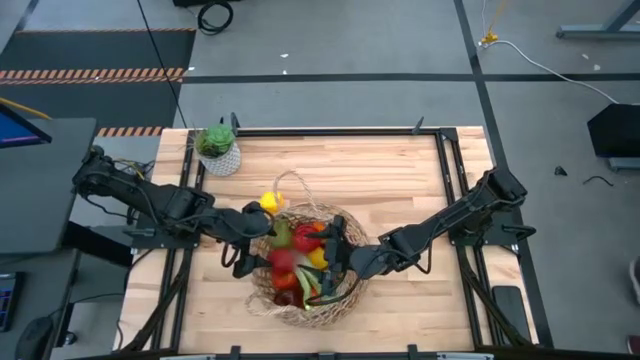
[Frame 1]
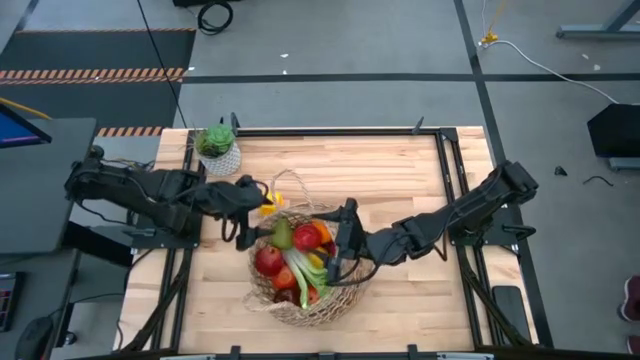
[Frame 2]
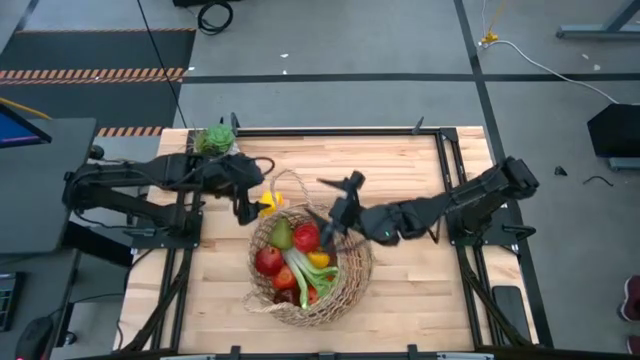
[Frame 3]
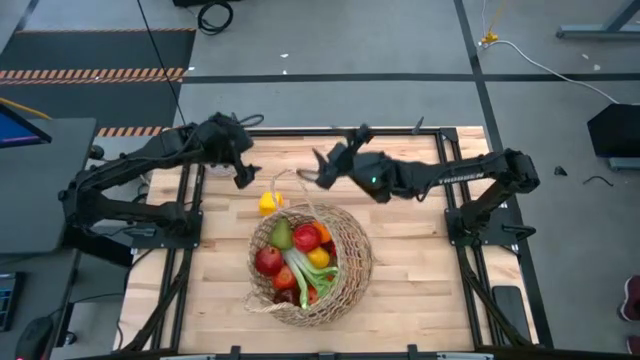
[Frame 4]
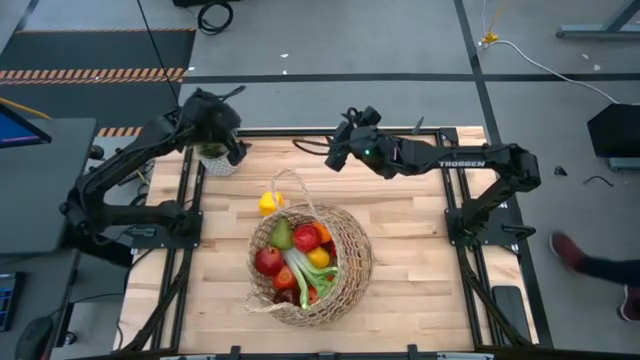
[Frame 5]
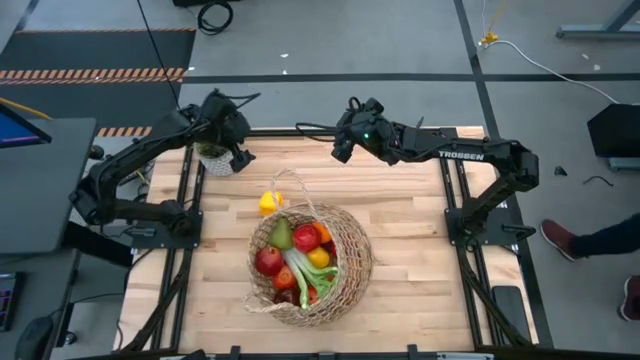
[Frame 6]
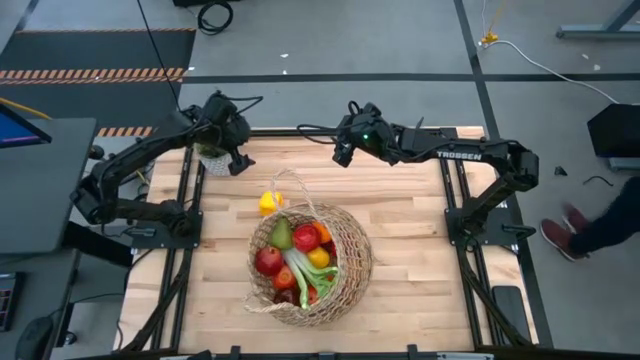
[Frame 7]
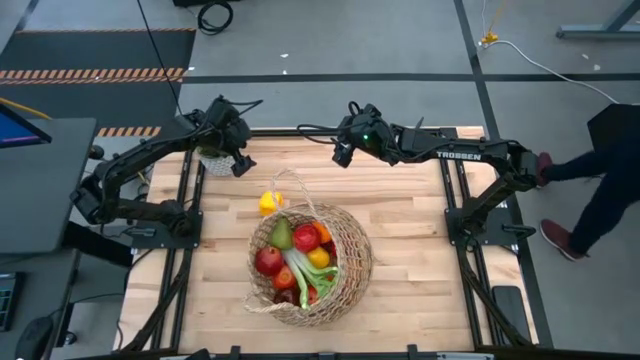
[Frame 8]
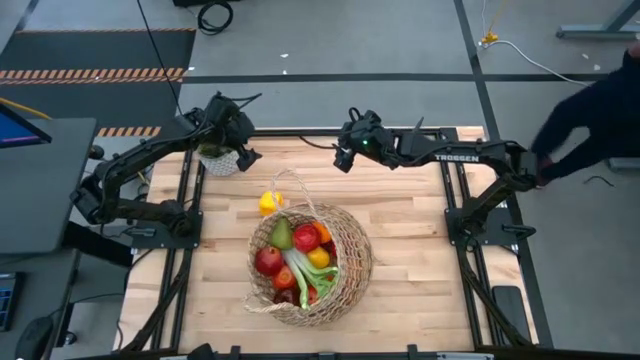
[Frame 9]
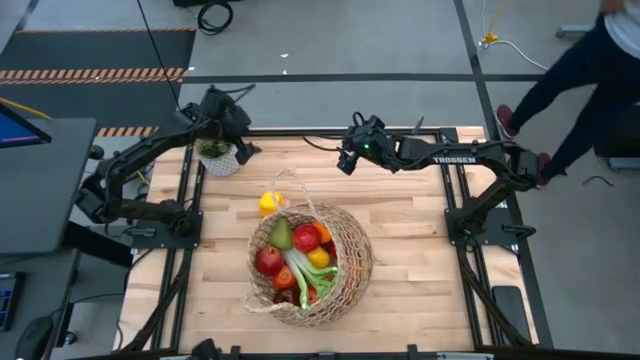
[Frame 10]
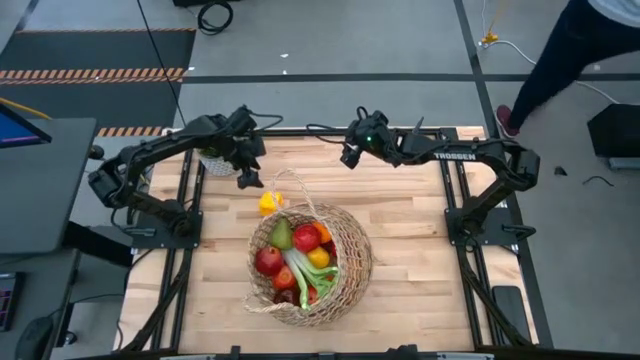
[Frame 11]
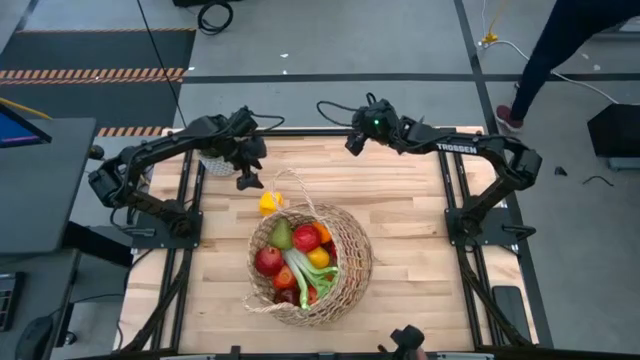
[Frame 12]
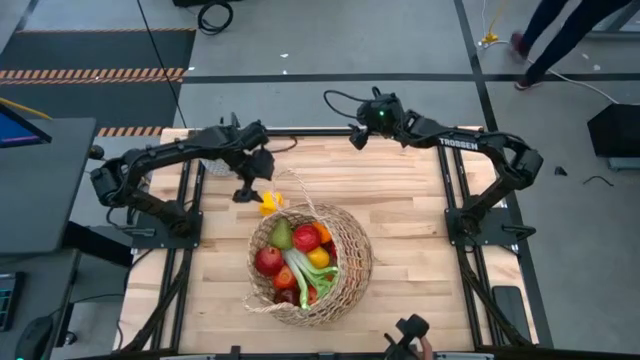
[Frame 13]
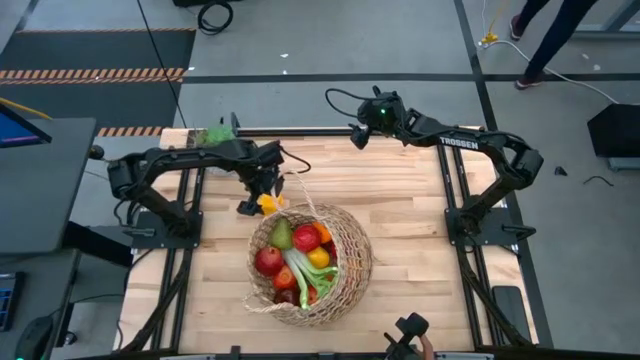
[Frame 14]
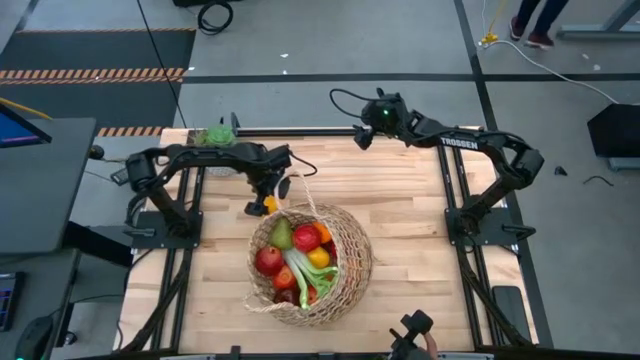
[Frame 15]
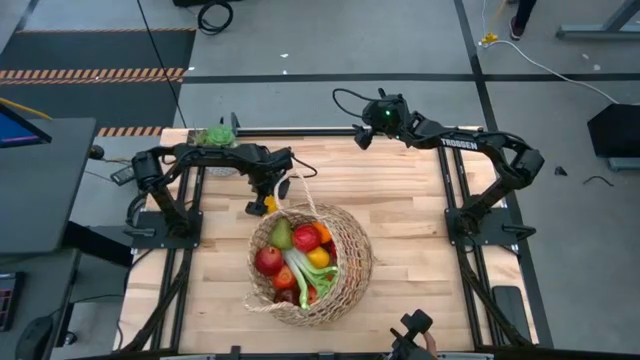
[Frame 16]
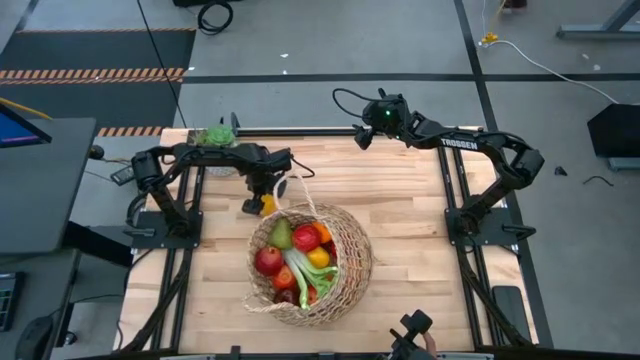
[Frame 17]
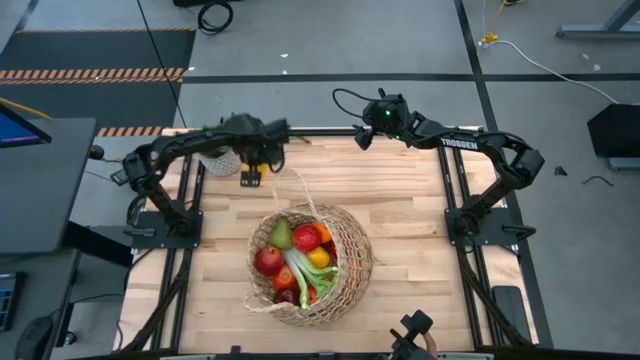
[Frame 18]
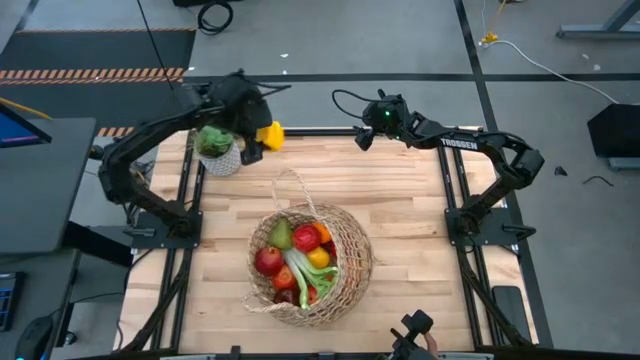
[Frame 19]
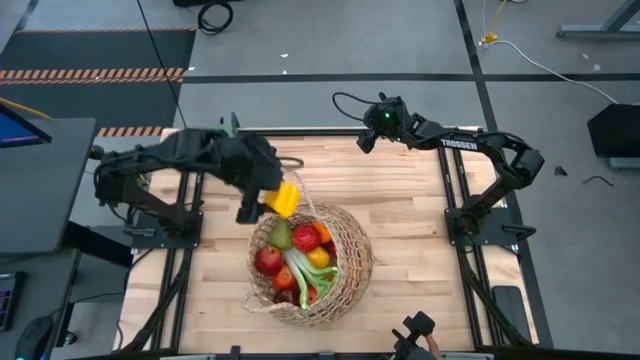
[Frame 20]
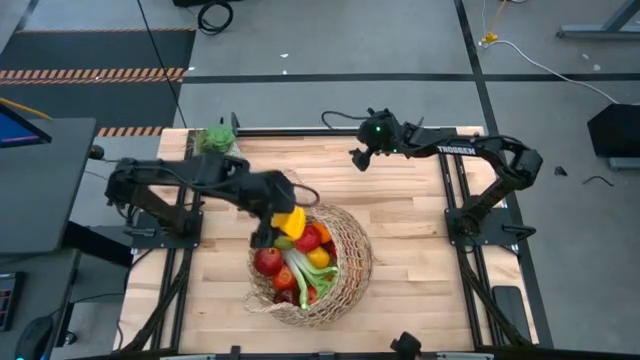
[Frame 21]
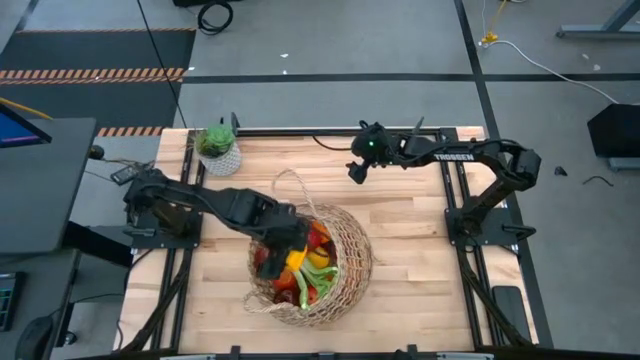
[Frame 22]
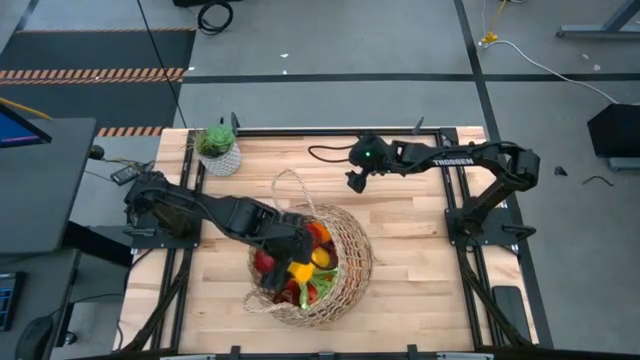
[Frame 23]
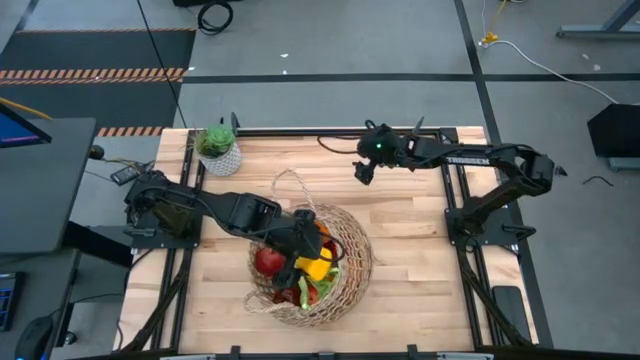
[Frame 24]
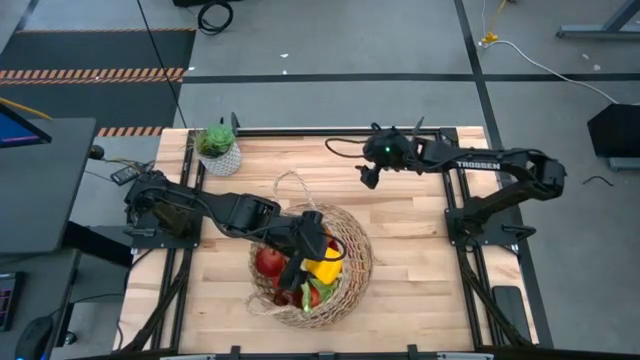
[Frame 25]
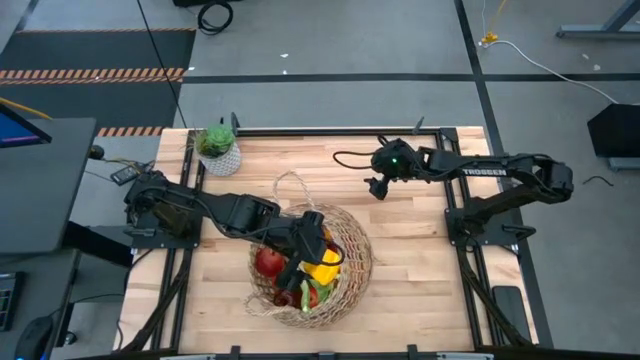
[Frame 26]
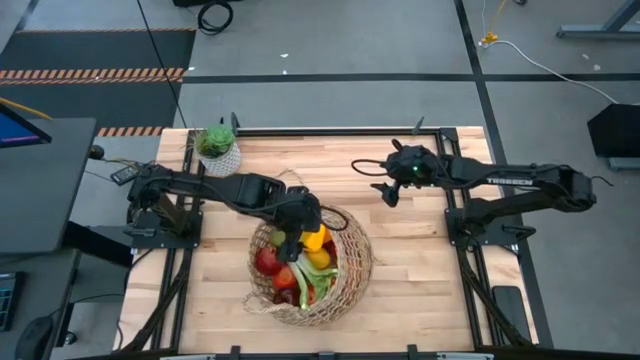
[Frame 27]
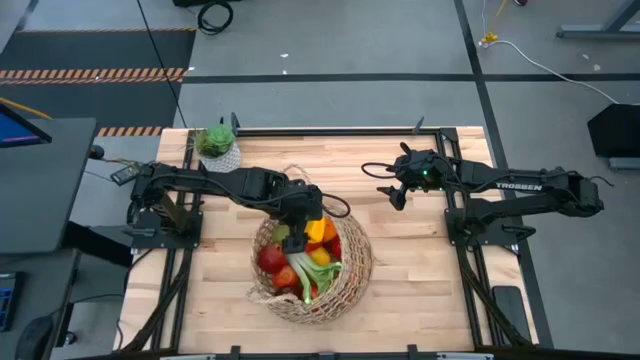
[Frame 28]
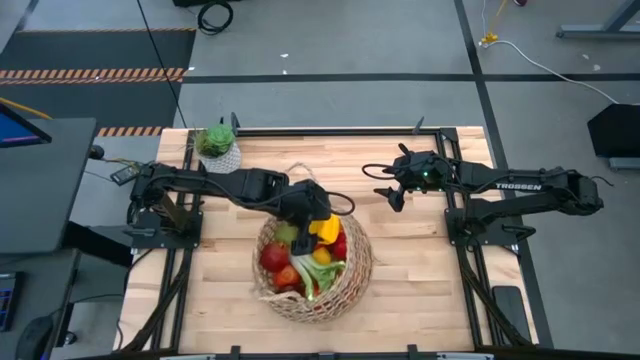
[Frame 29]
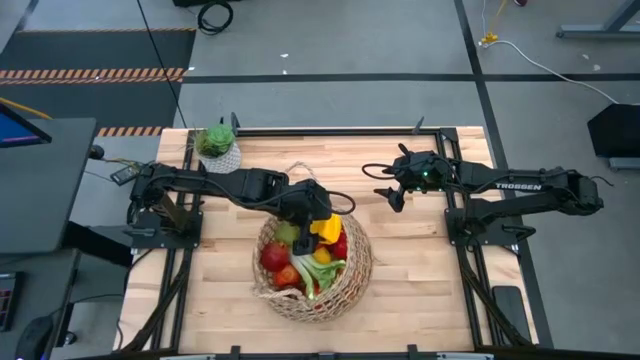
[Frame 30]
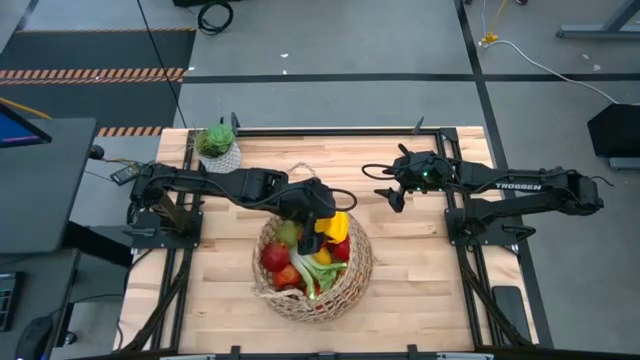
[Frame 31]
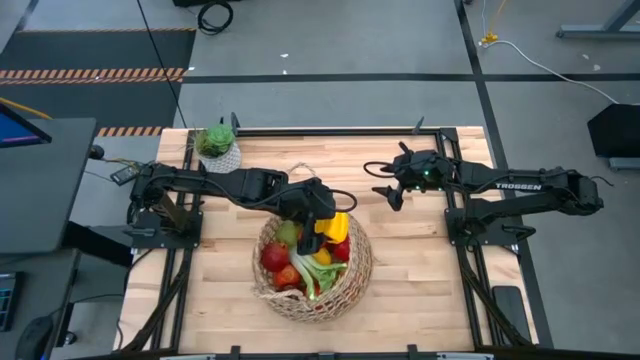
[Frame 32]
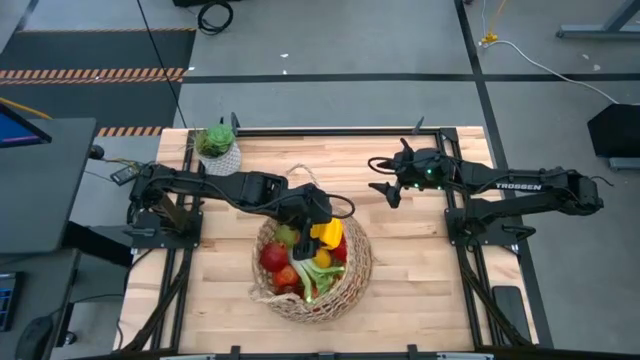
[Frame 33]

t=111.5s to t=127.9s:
Task: Build produce basket
Put the bell pepper into the basket
